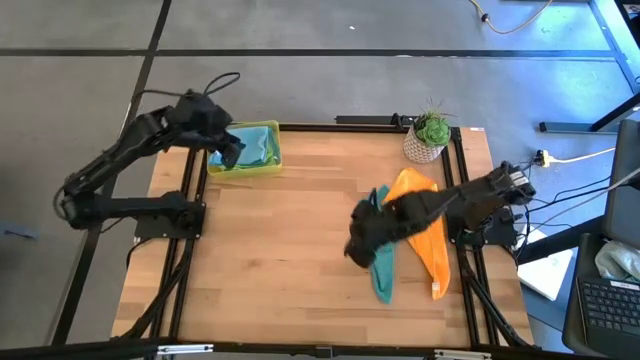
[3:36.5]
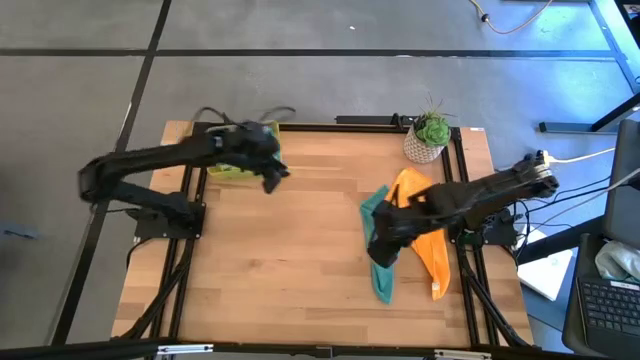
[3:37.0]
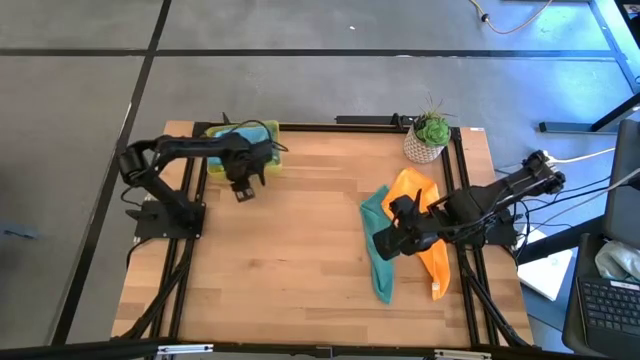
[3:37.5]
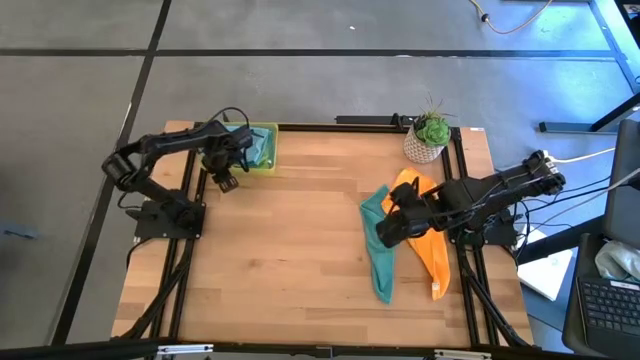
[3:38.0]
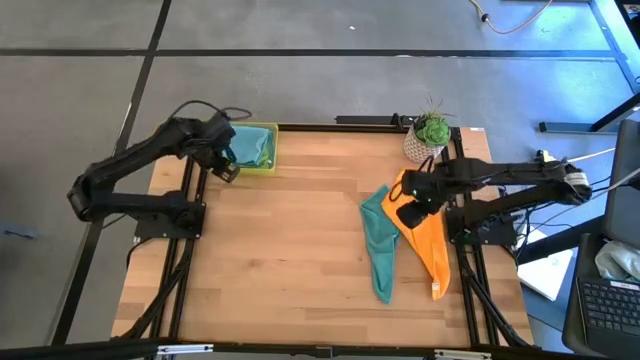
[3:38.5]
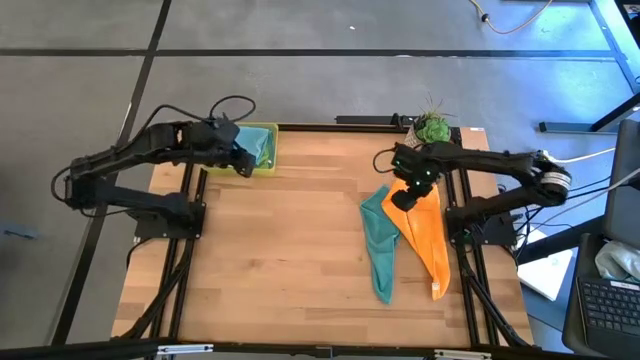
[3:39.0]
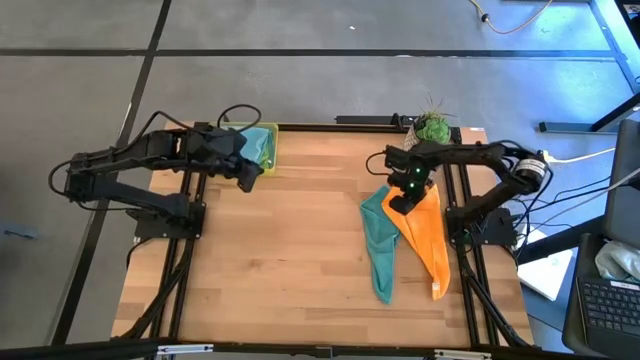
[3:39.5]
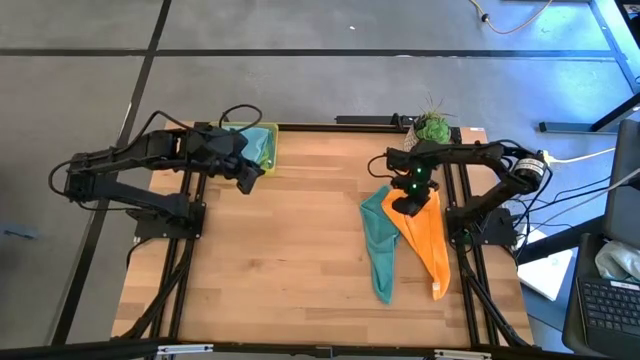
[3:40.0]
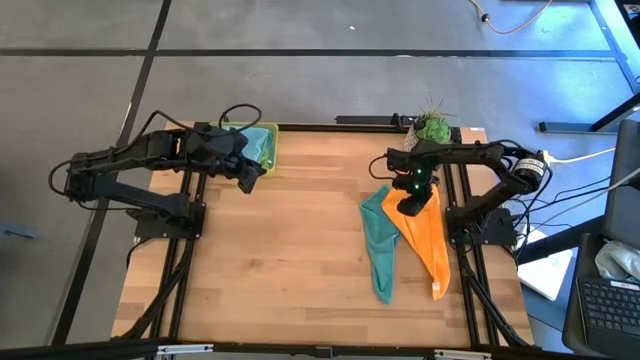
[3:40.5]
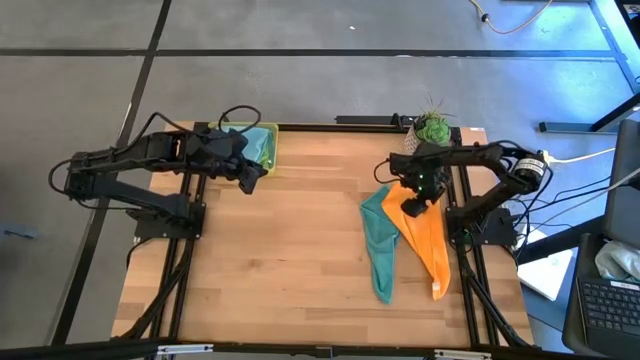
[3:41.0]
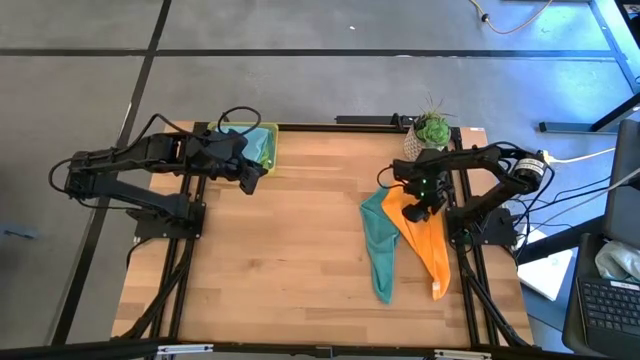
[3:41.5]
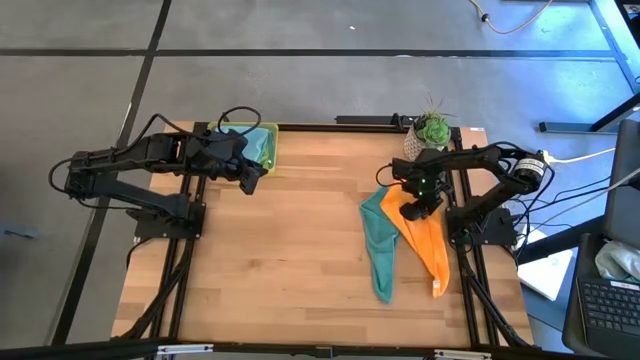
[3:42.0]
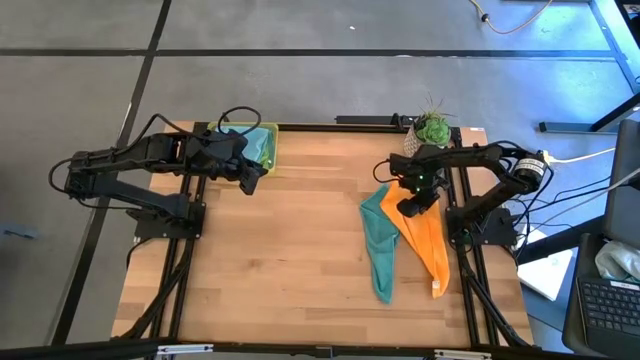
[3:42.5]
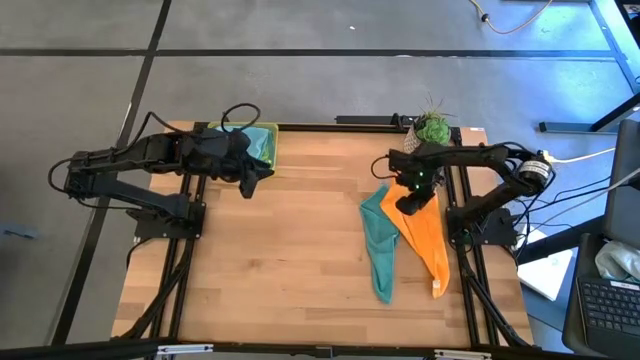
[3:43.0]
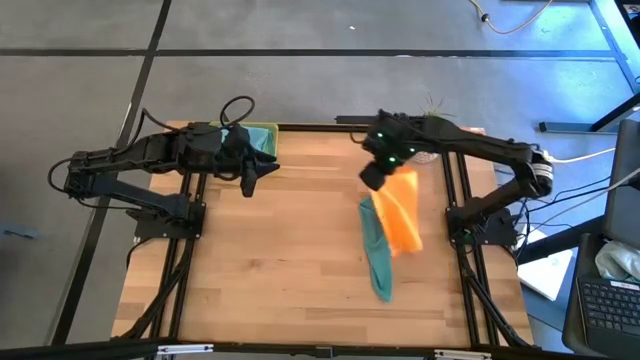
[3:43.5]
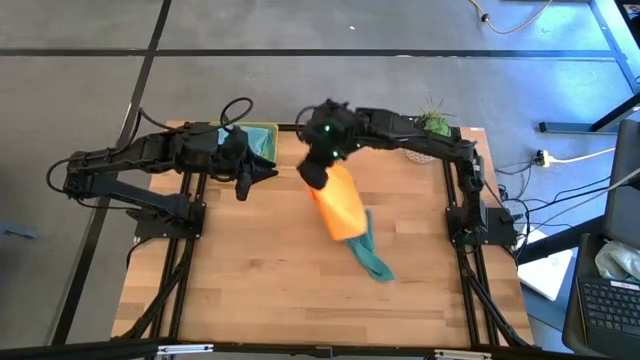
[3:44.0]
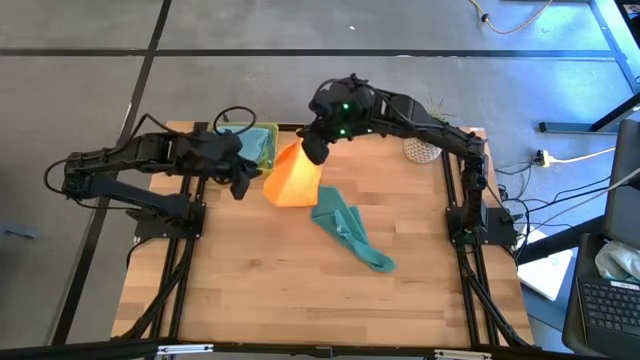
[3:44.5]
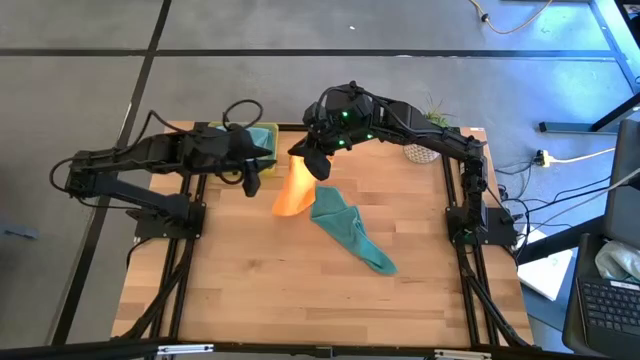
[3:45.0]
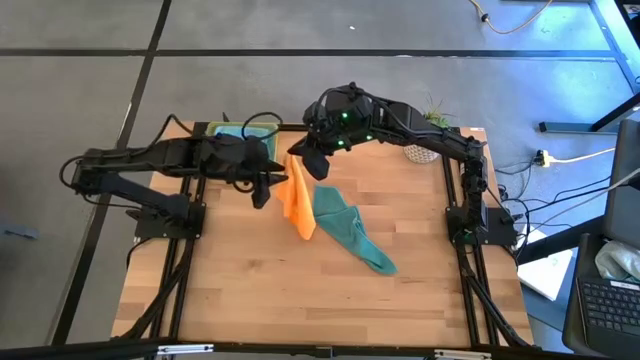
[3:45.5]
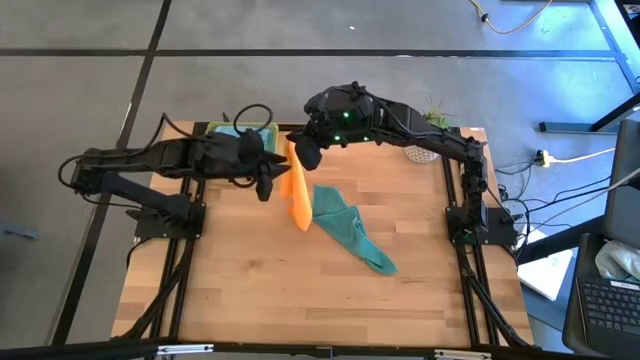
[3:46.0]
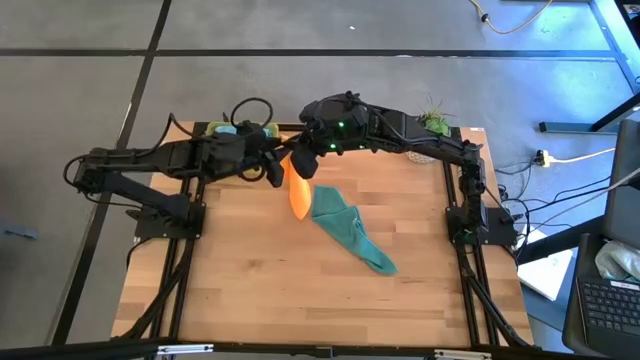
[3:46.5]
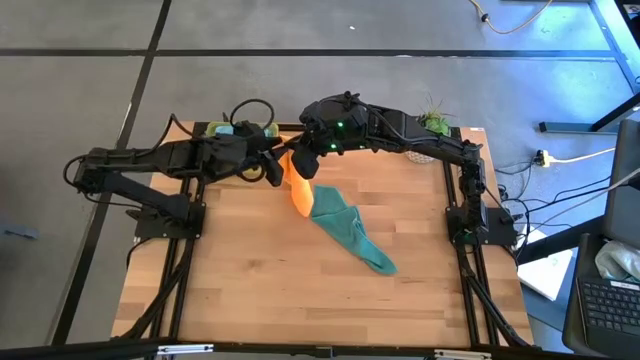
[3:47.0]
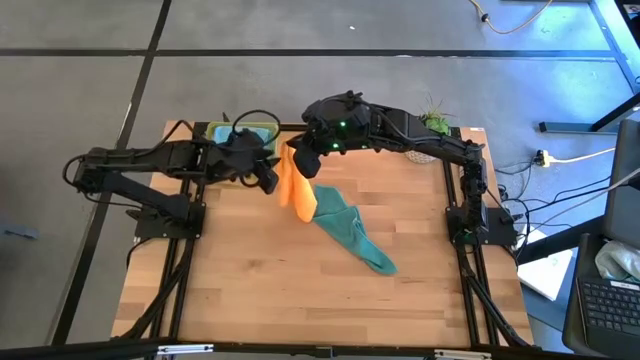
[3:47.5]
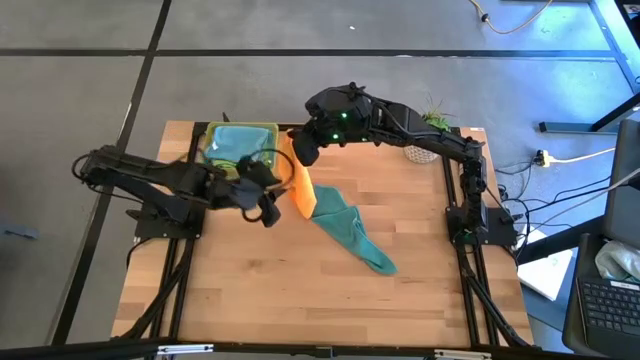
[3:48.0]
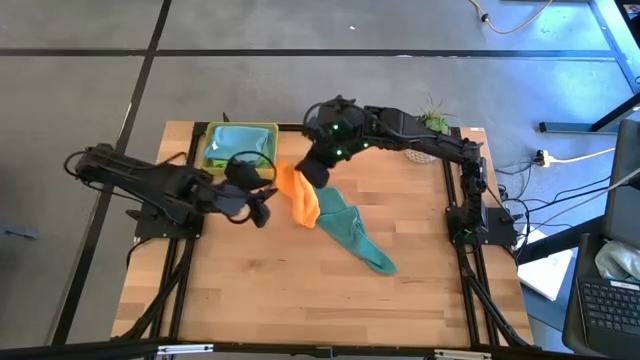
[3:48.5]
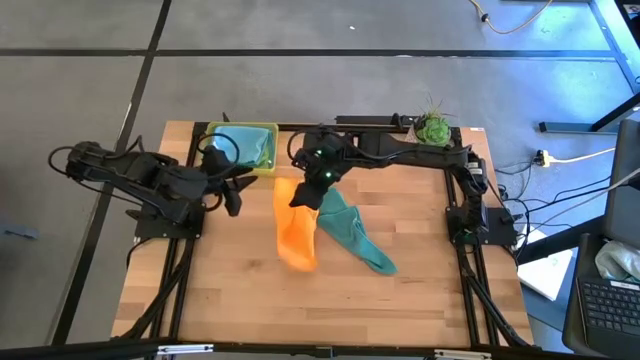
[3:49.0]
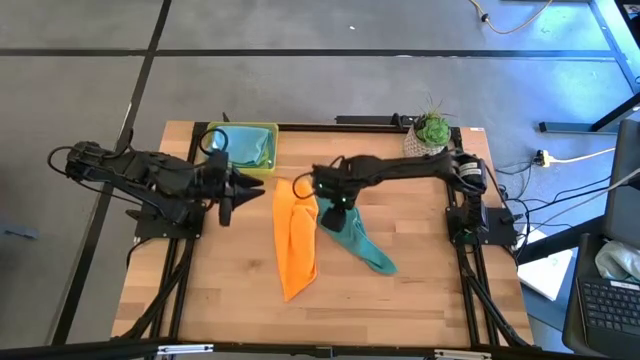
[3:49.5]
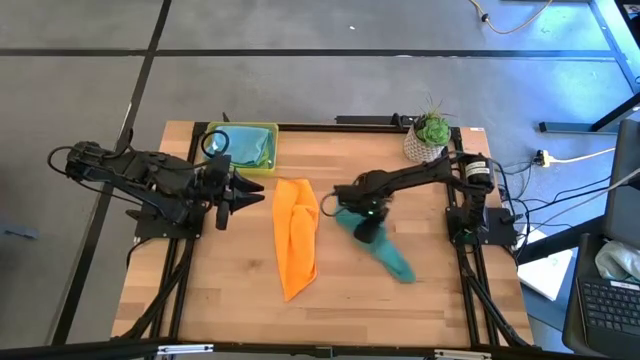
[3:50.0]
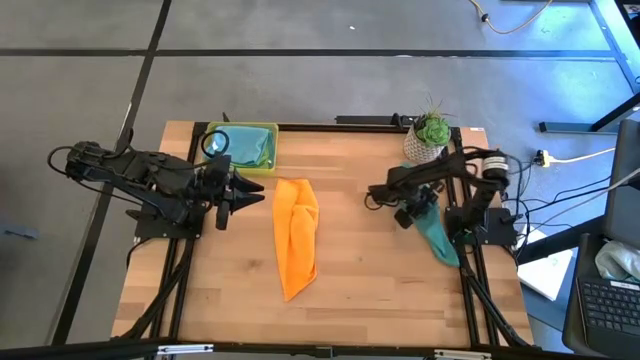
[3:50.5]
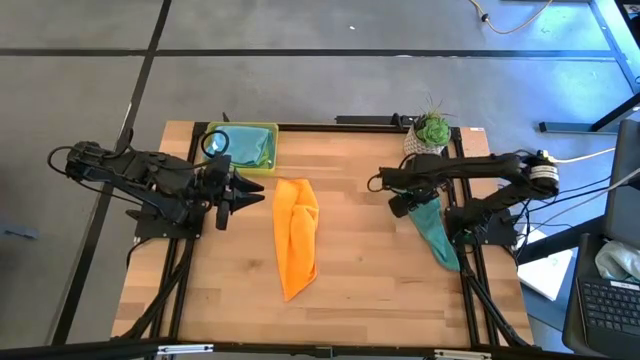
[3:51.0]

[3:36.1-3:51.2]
Task: Fold microfiber towels
Fold the orange towel

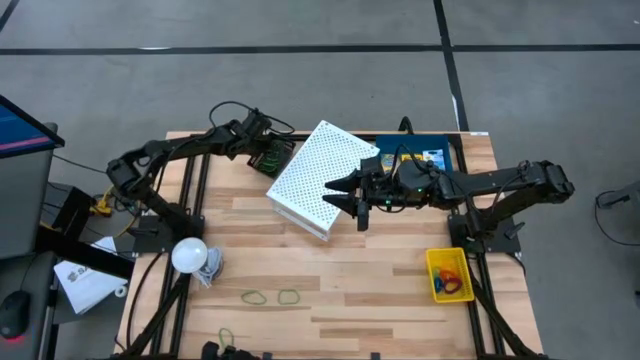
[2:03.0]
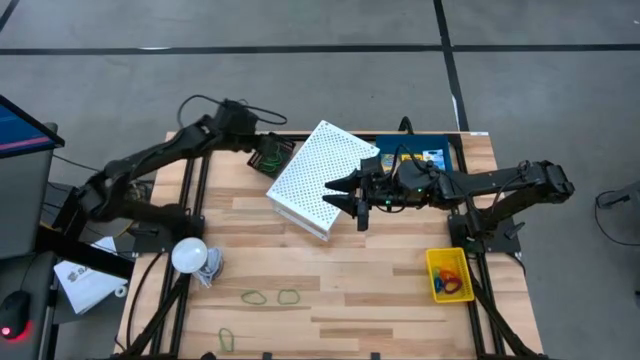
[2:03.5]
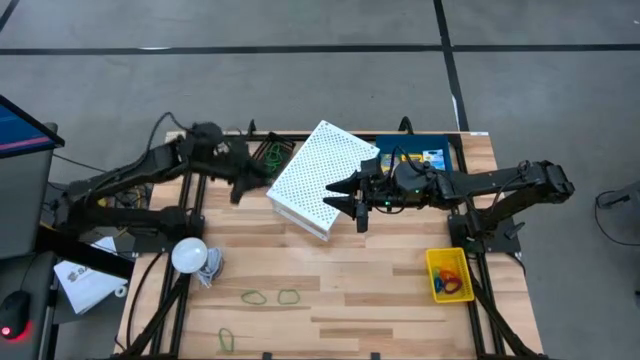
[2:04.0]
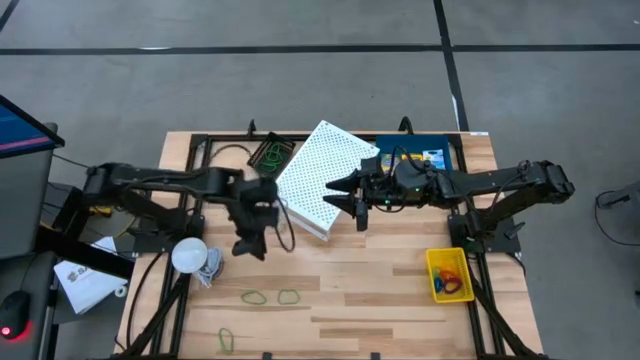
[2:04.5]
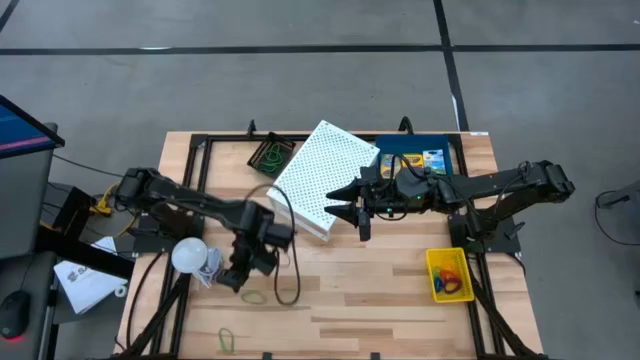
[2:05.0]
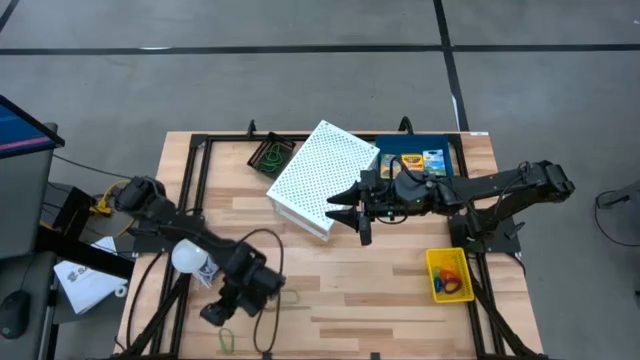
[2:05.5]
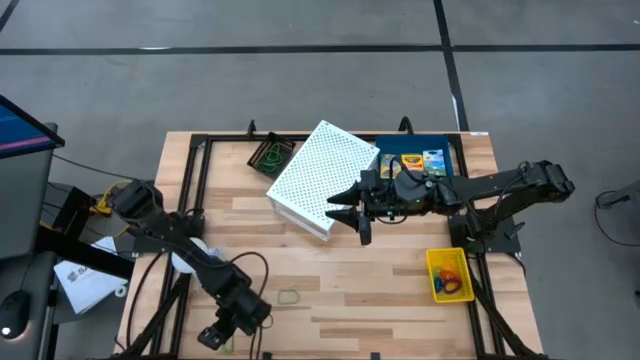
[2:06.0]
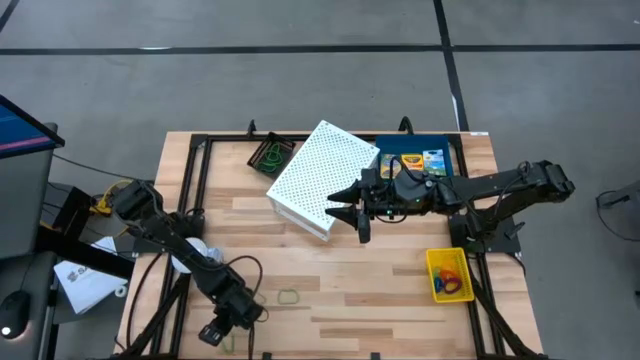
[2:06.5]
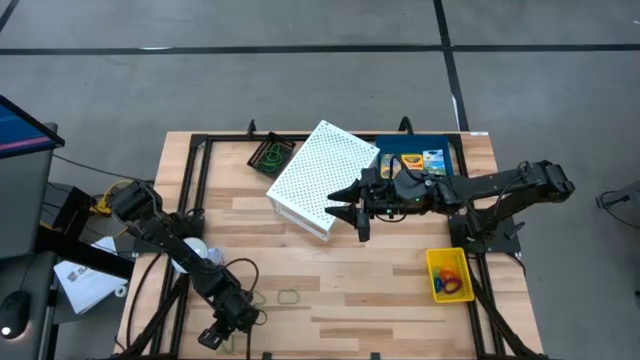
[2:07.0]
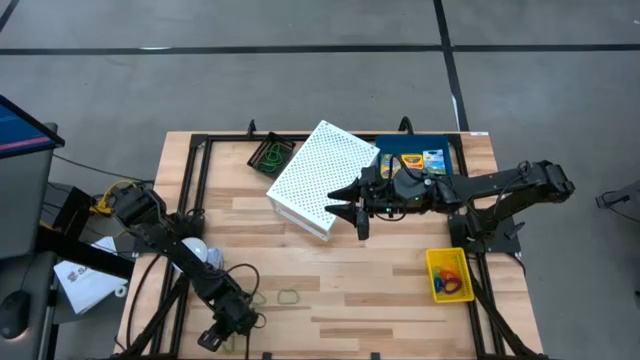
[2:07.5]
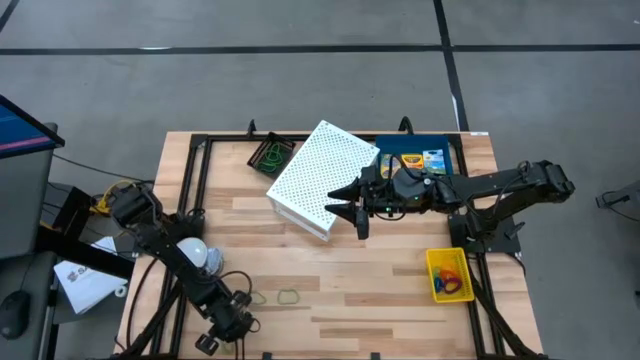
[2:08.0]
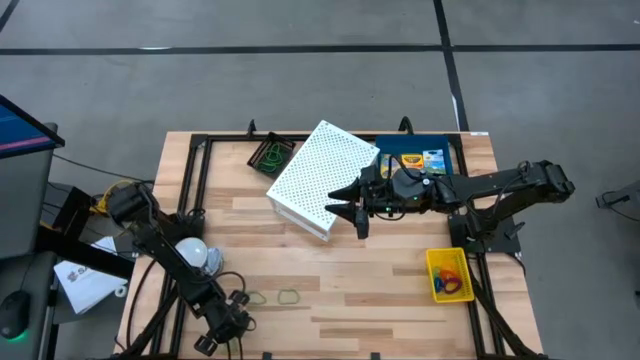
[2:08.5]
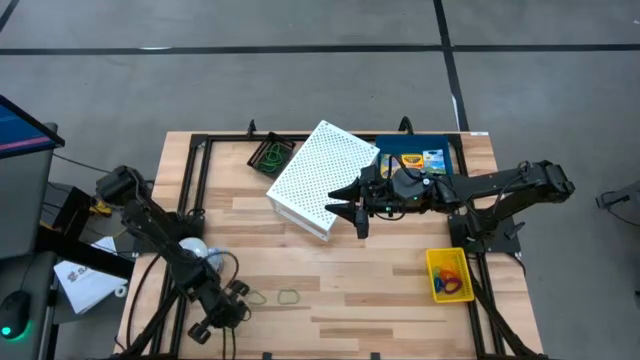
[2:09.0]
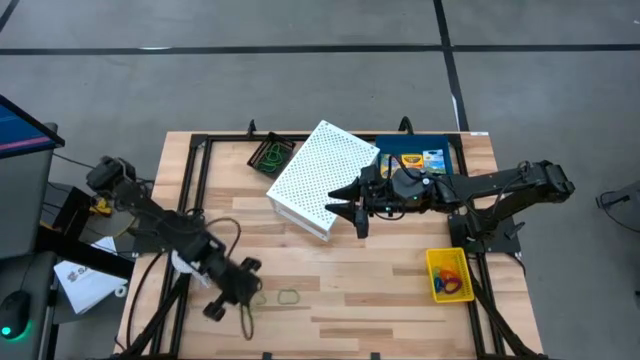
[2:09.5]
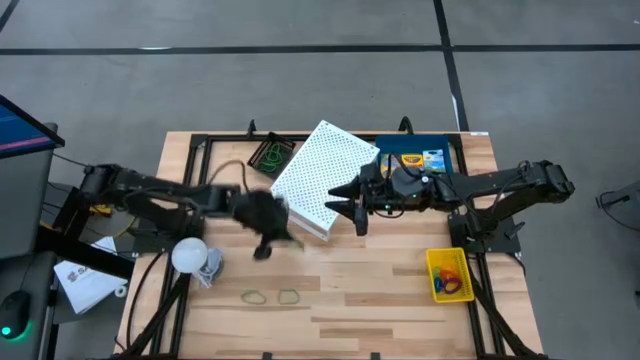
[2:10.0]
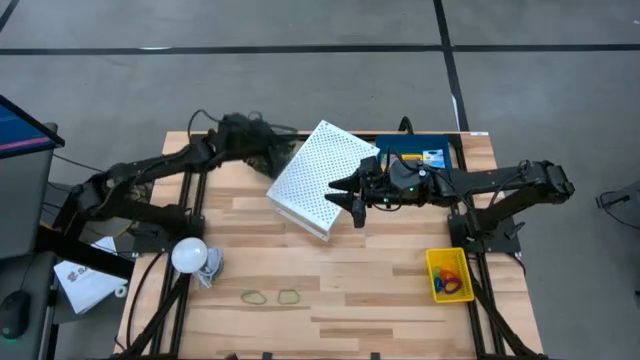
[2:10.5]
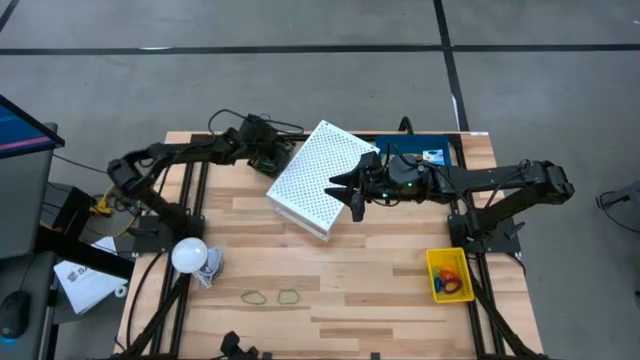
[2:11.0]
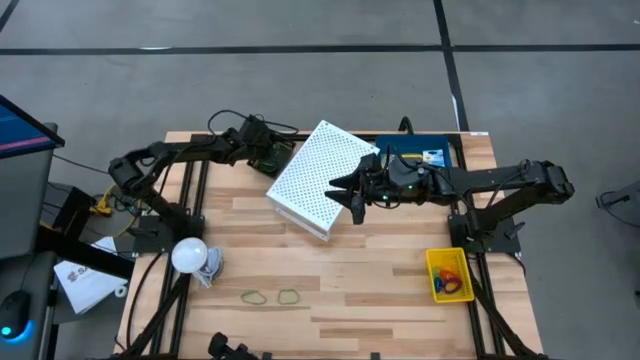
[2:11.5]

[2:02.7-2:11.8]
Task: Pick & Place Office Desk Supplies
Put the green rubber band into the black bin
